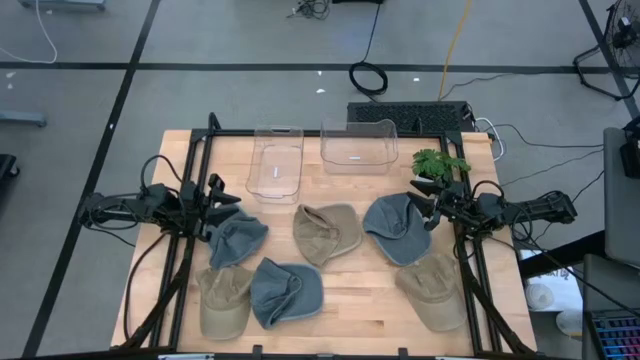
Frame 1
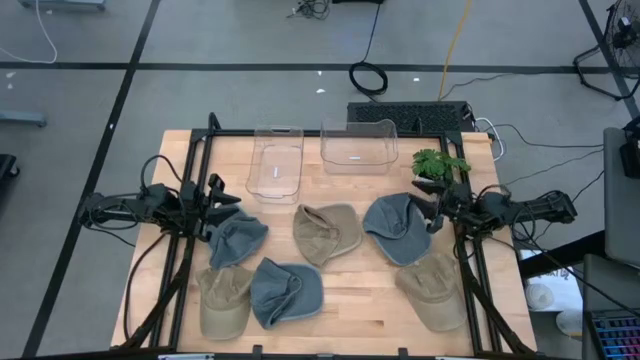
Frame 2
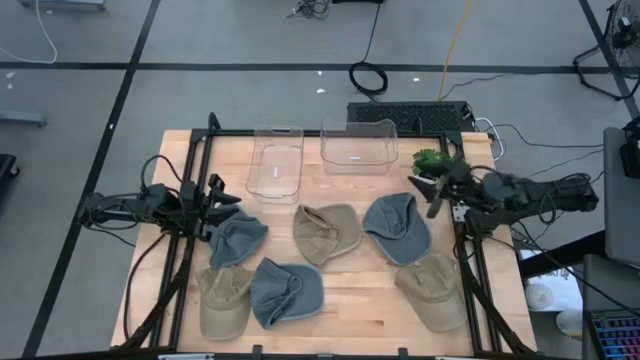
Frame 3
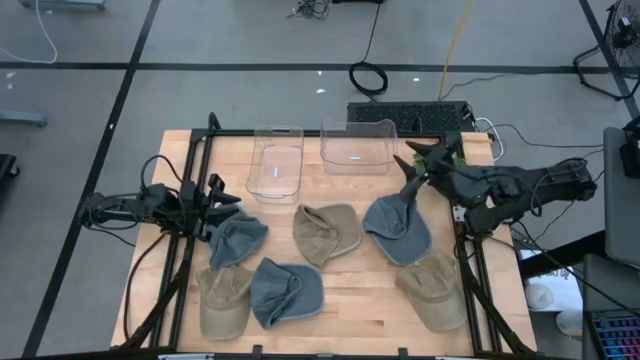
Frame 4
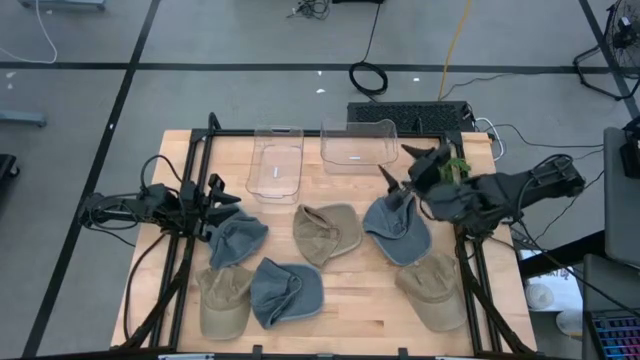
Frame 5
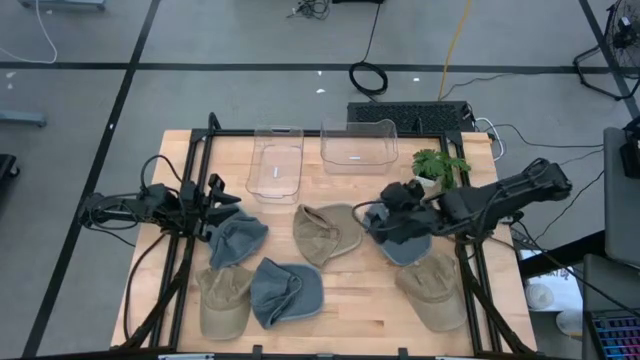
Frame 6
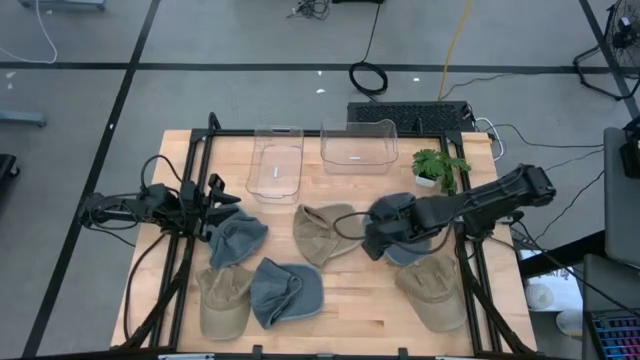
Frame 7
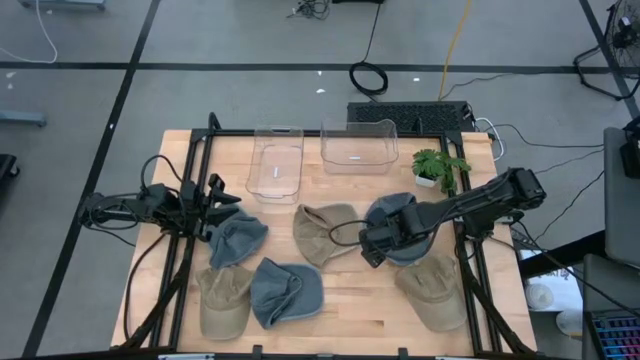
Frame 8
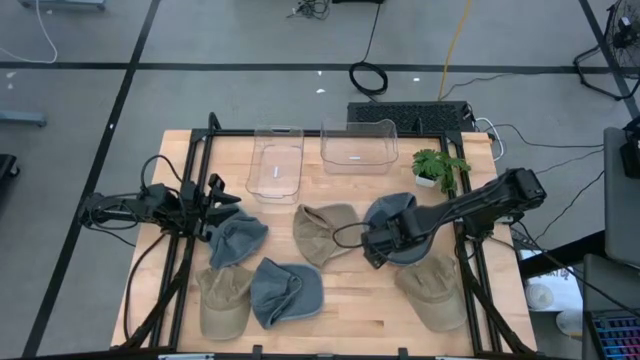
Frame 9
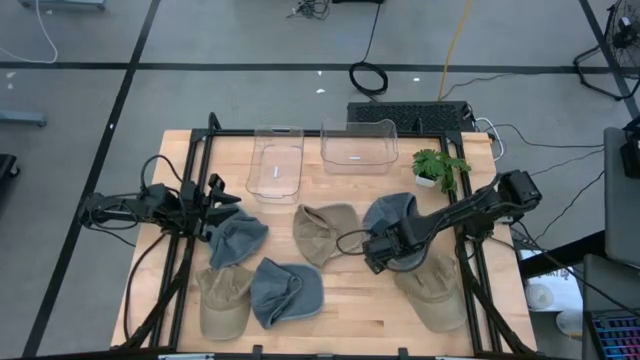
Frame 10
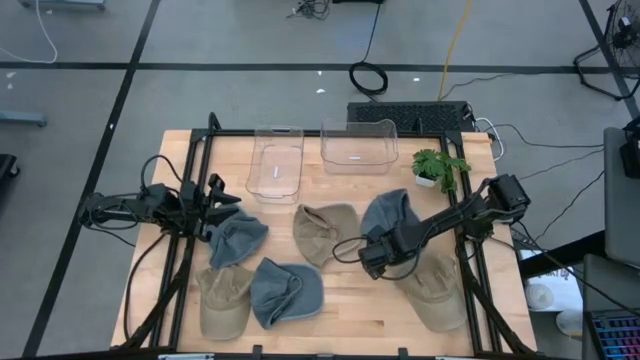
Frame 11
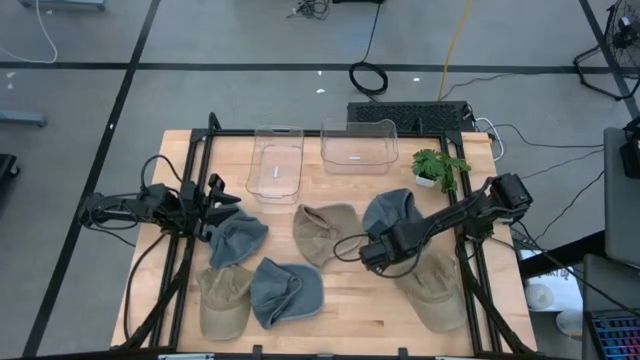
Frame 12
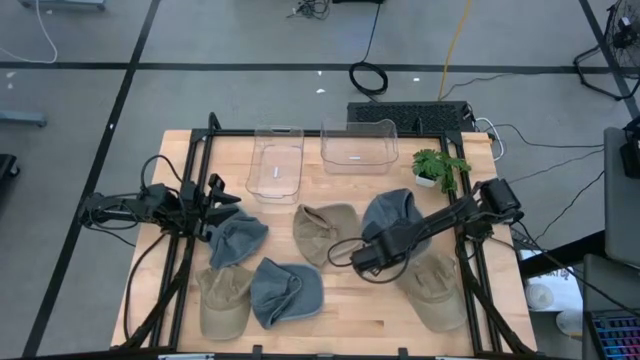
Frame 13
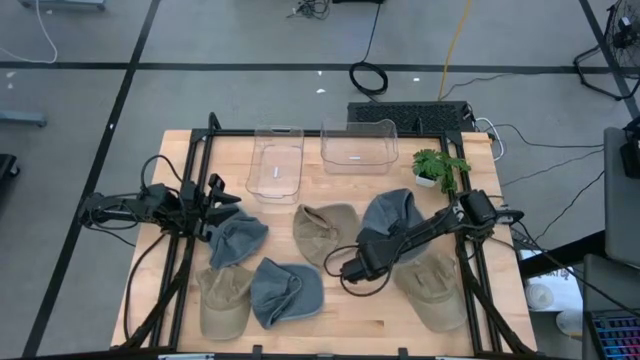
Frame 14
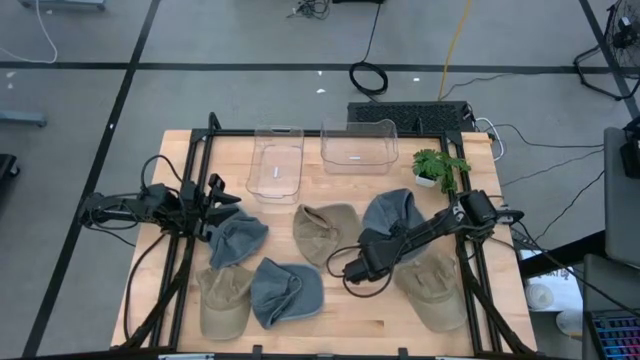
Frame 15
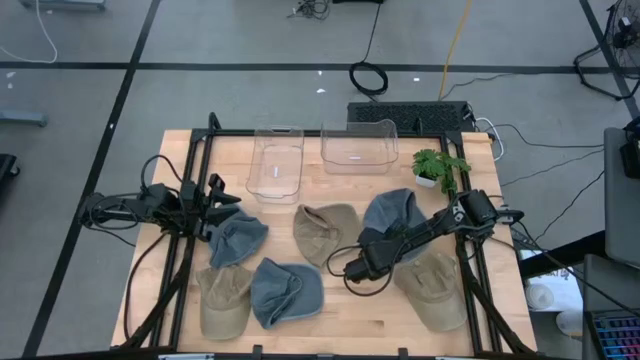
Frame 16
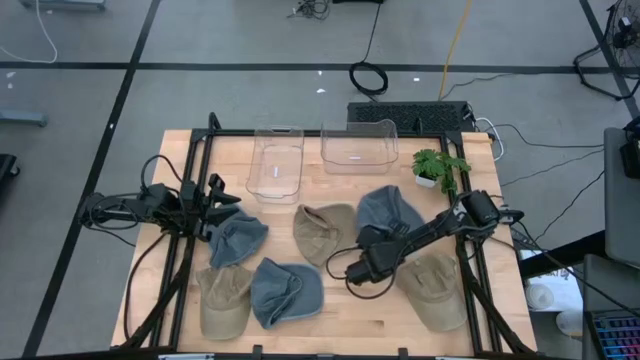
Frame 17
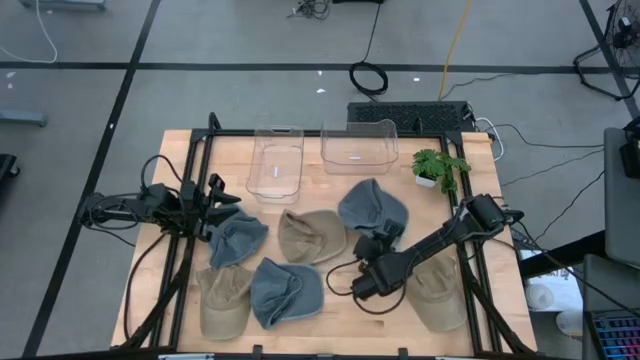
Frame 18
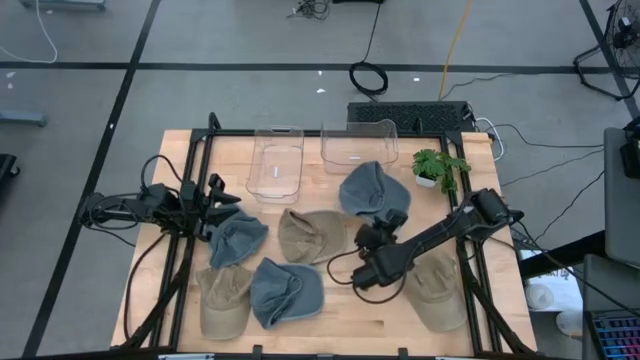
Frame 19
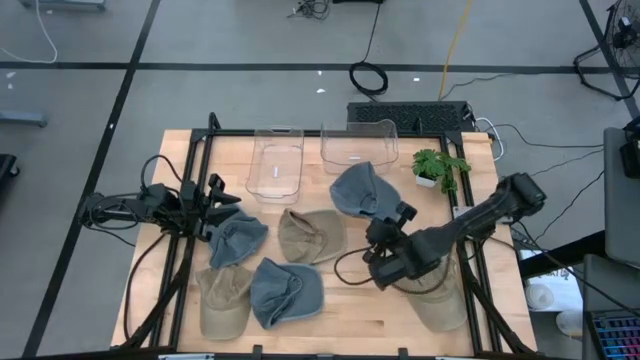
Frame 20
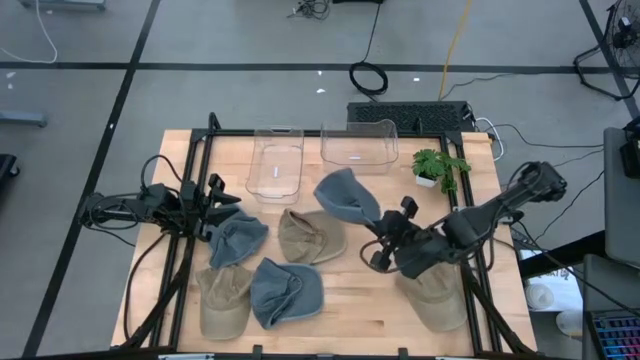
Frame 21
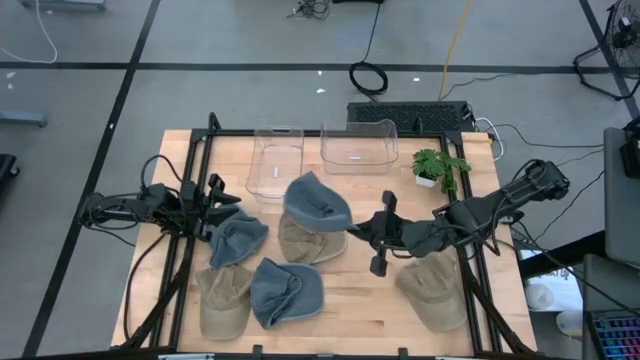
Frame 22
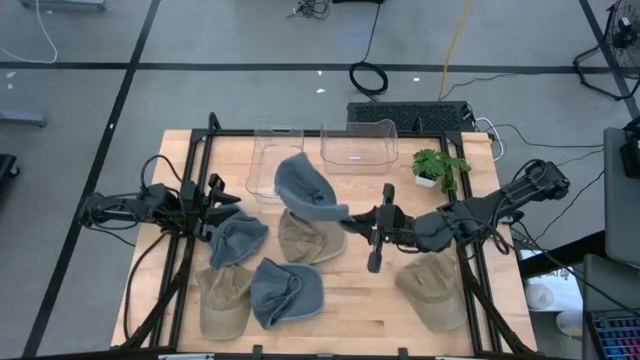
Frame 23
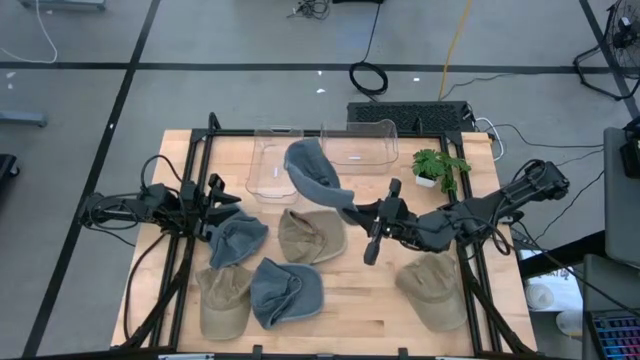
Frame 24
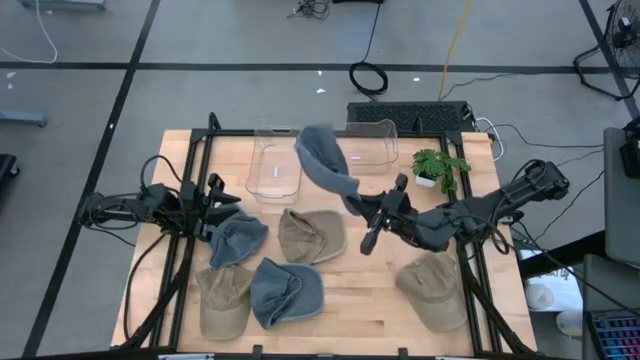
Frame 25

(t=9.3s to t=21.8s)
Task: Pick & Place hat
Put the top right blue cap into the right transparent bin

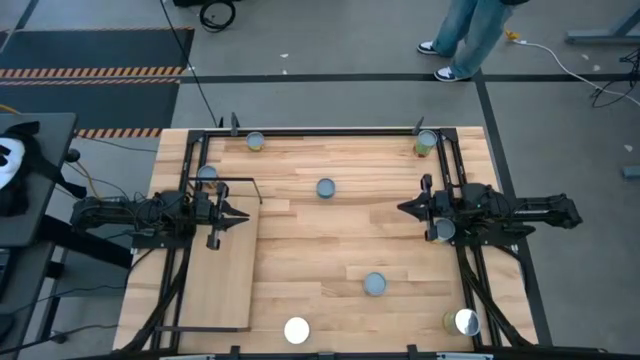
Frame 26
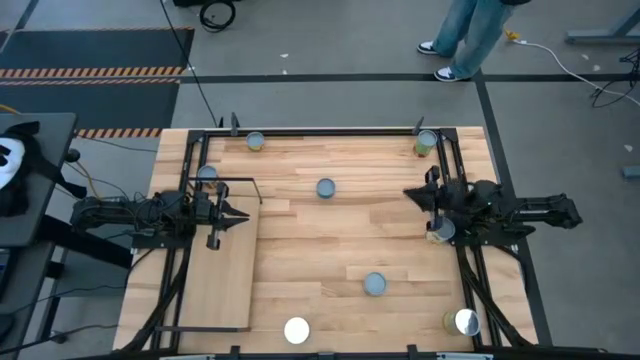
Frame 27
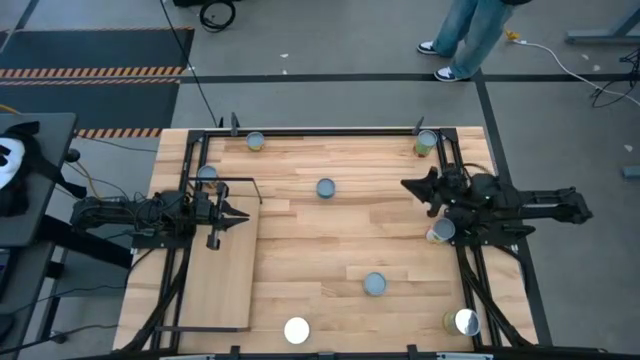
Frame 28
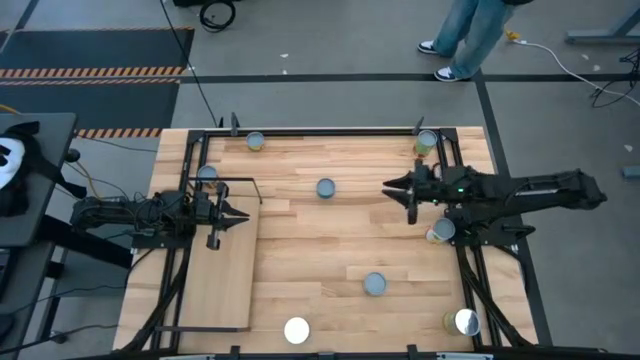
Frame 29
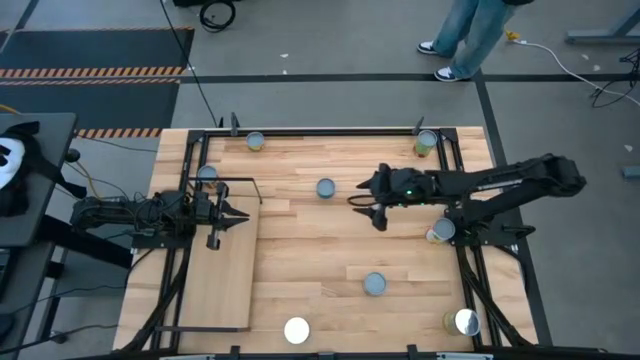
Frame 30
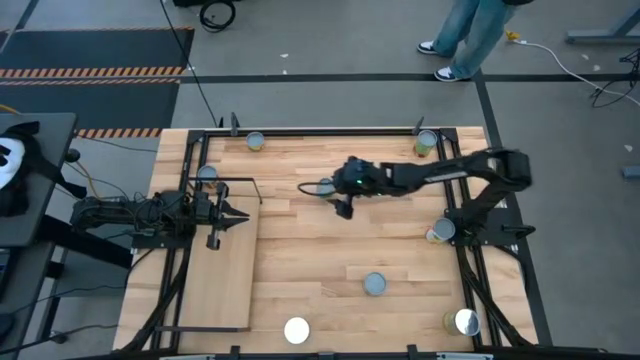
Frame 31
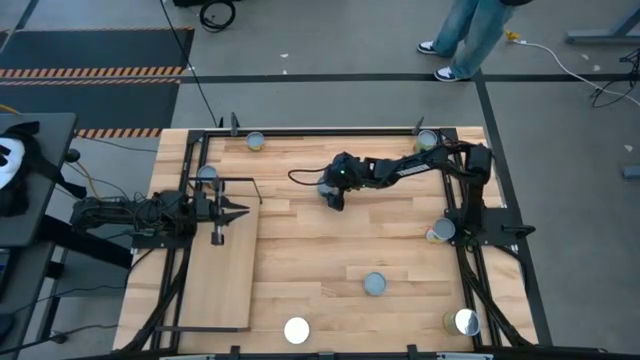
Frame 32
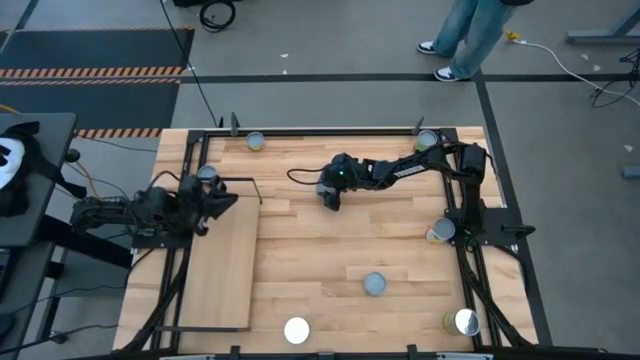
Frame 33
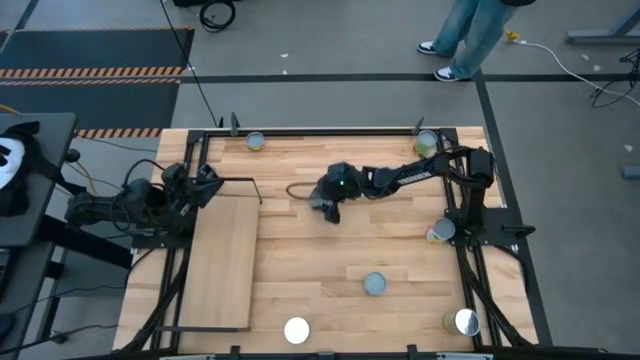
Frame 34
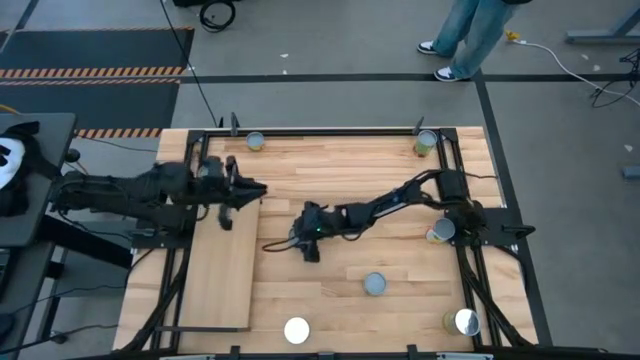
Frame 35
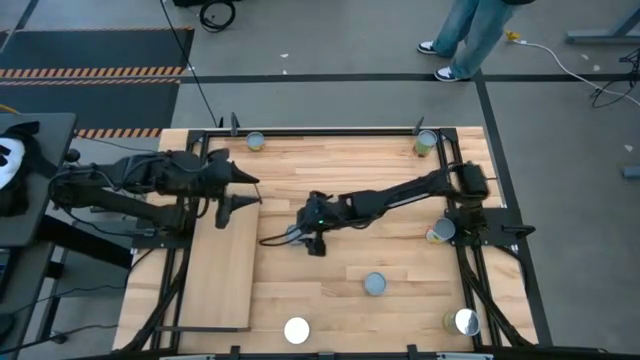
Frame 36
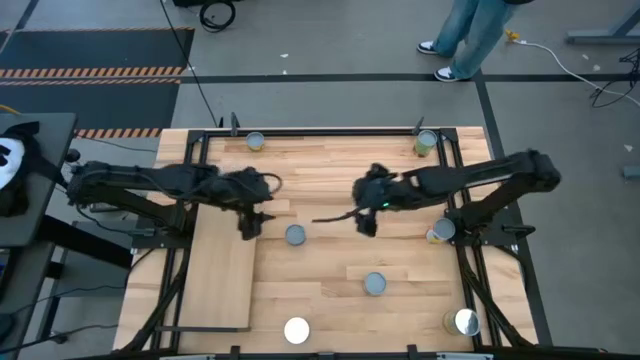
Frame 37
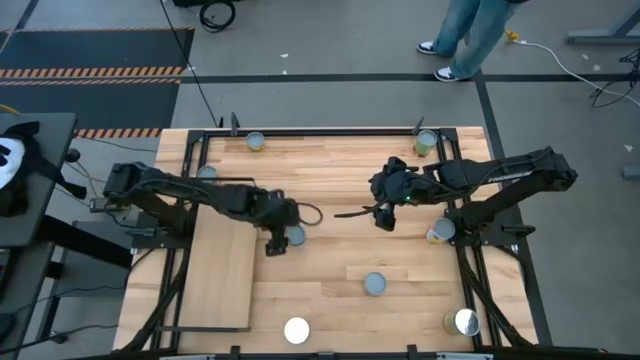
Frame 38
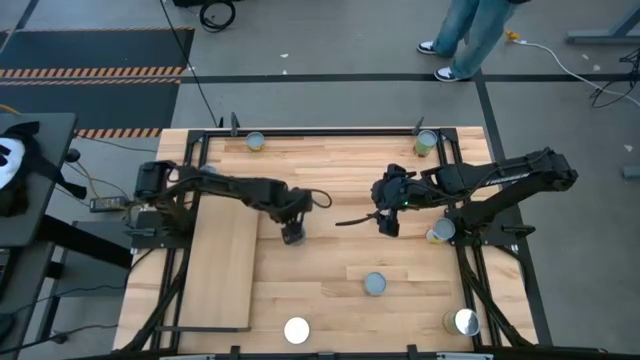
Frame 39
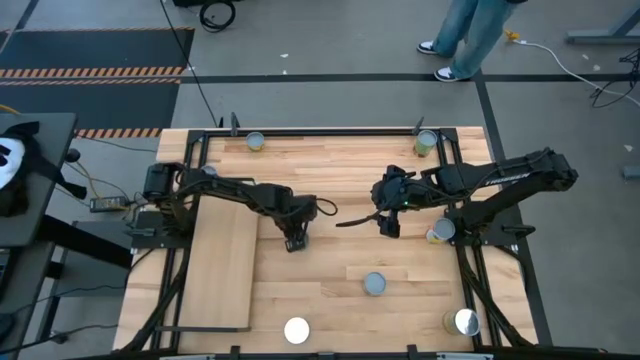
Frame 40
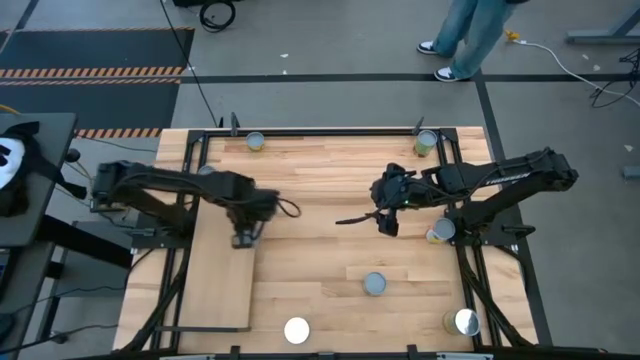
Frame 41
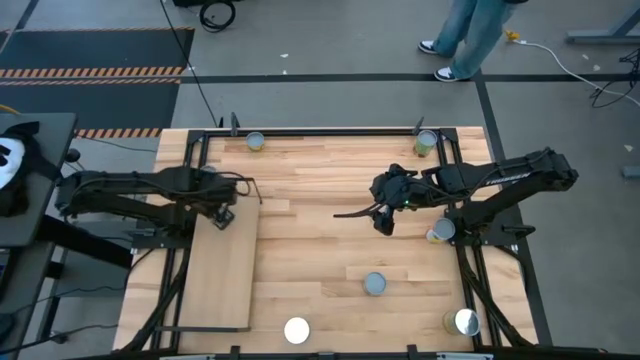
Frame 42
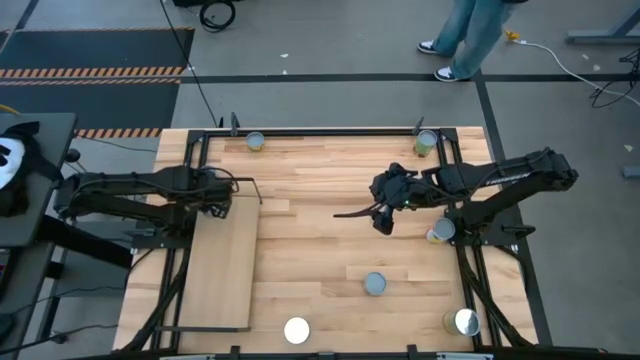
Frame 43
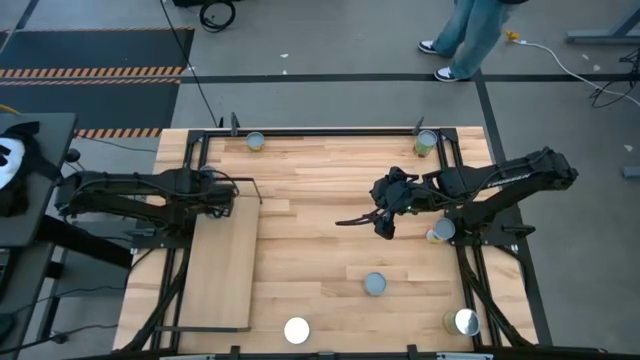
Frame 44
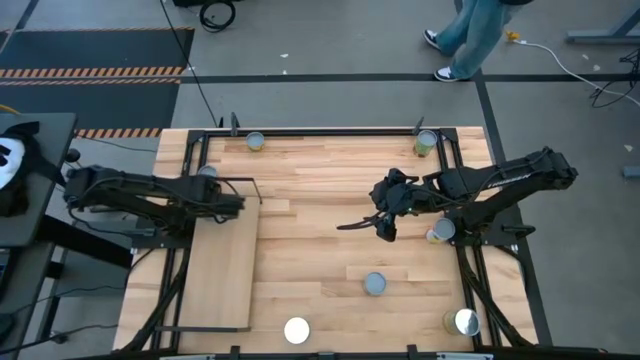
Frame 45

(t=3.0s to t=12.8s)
Task: Pick and place cans onto a shelf
Put the canned tuna on the shelf
